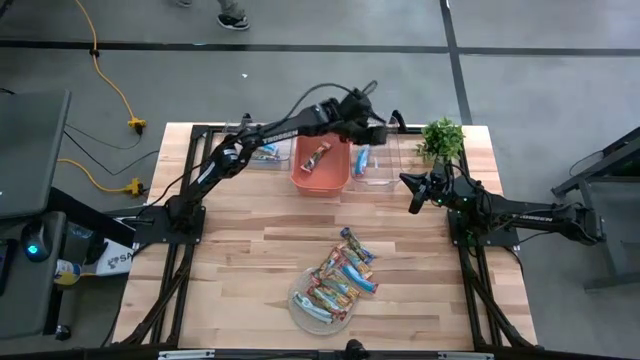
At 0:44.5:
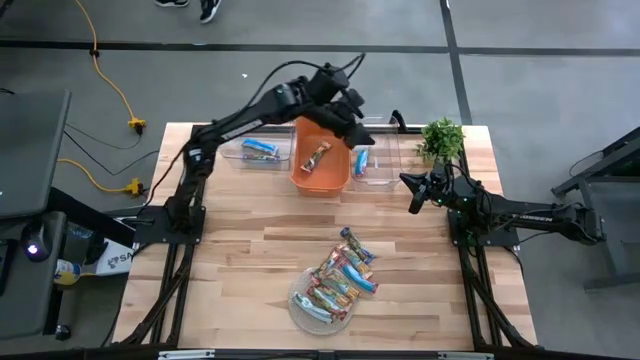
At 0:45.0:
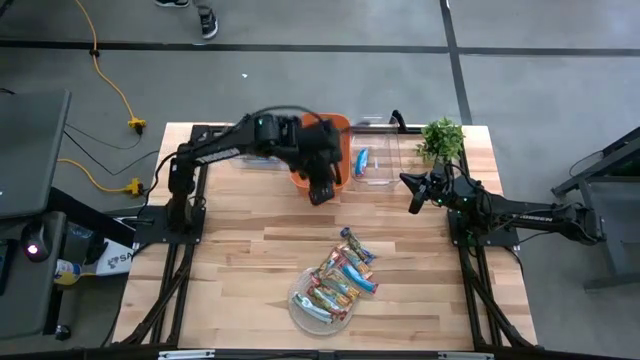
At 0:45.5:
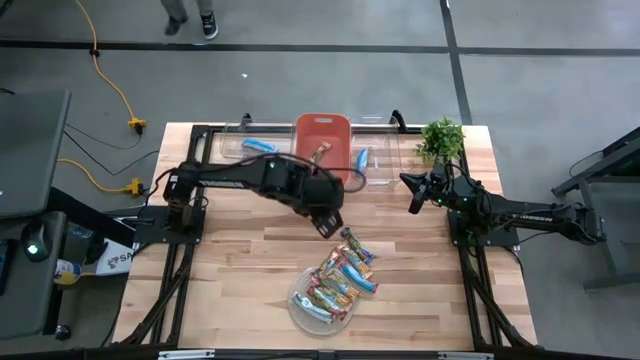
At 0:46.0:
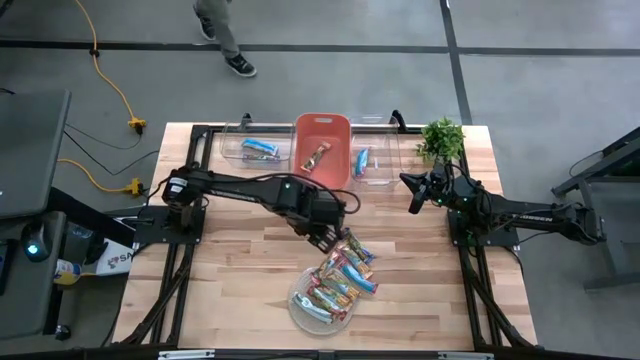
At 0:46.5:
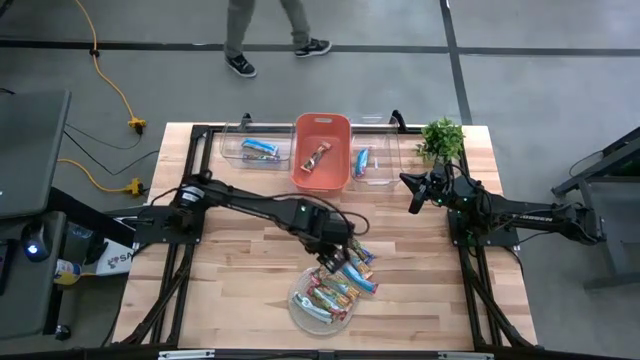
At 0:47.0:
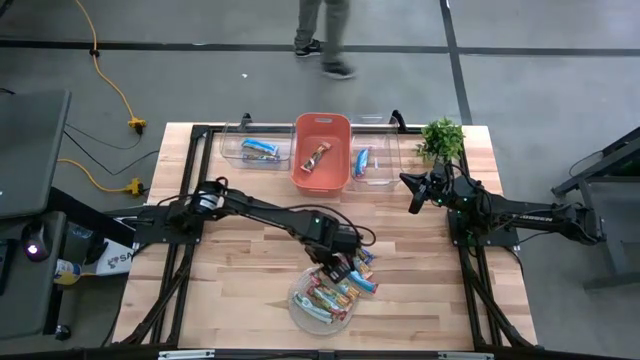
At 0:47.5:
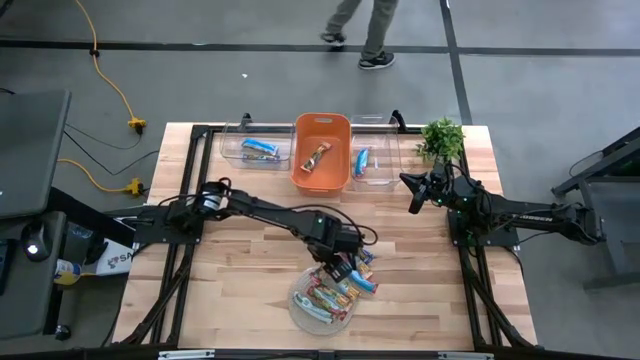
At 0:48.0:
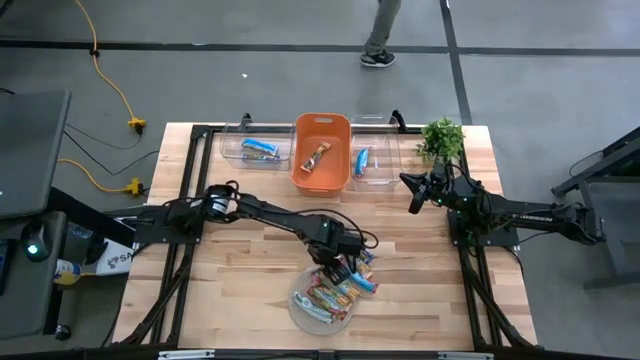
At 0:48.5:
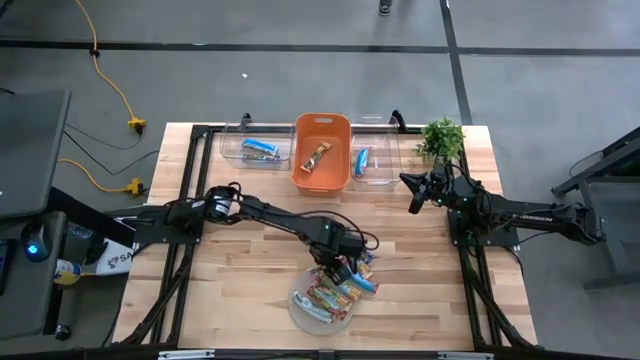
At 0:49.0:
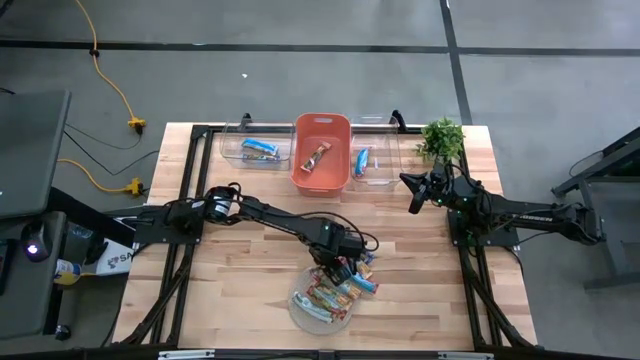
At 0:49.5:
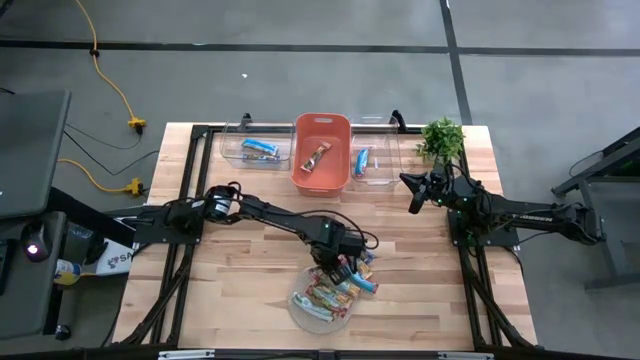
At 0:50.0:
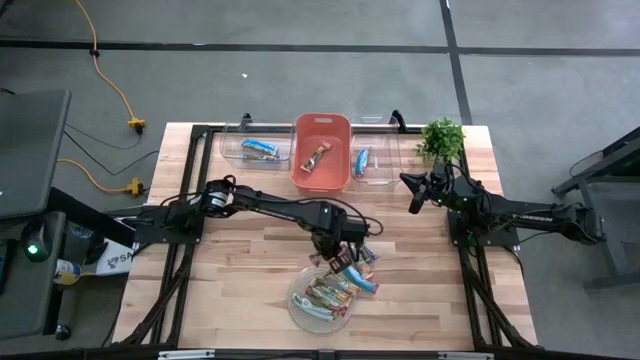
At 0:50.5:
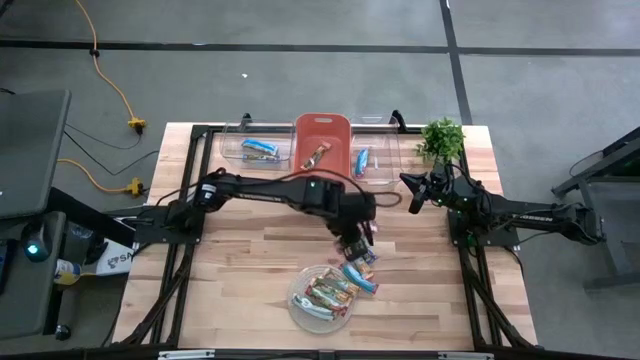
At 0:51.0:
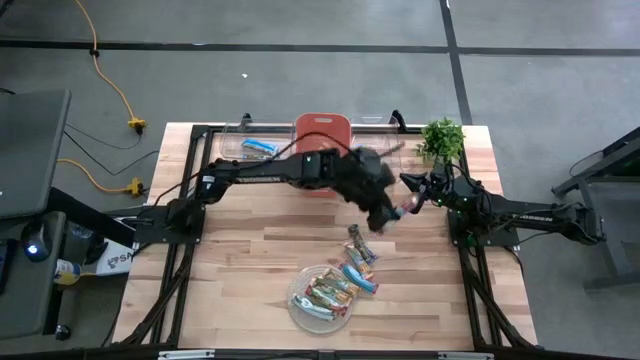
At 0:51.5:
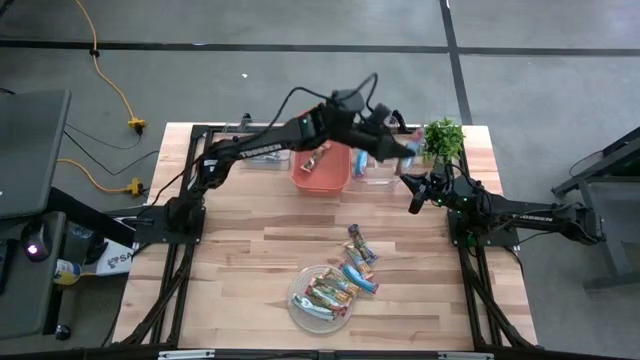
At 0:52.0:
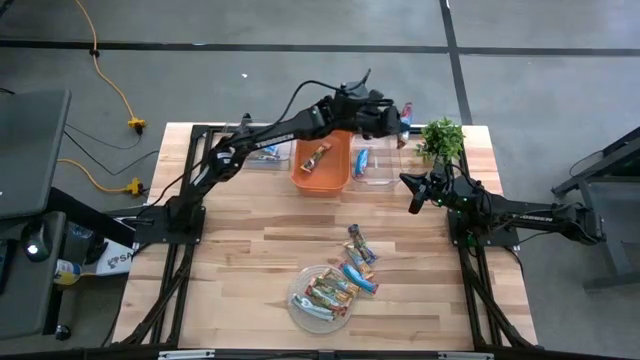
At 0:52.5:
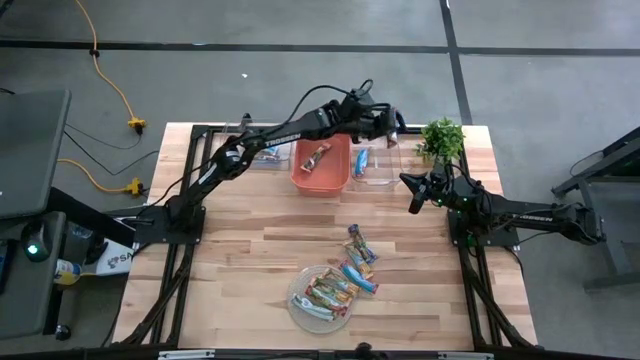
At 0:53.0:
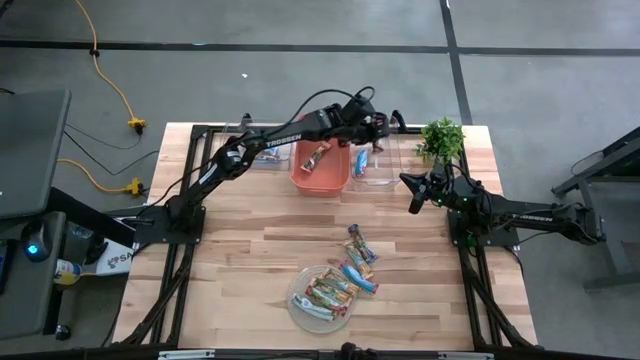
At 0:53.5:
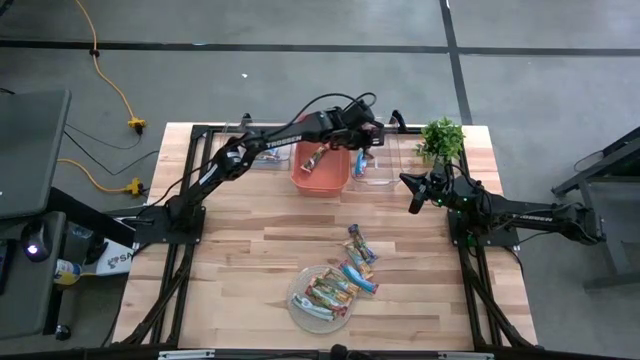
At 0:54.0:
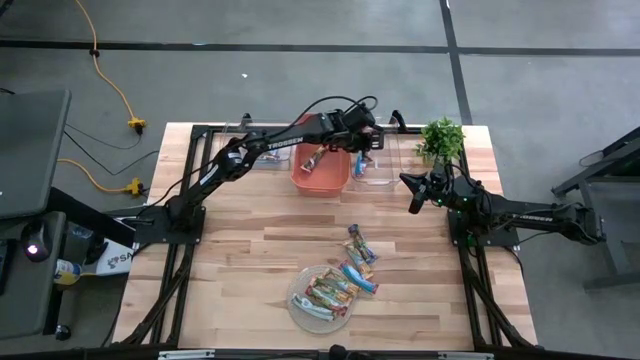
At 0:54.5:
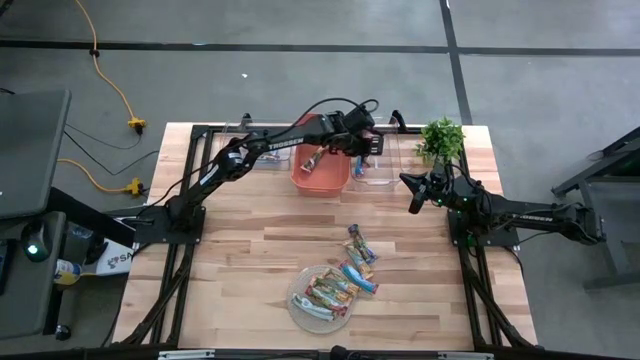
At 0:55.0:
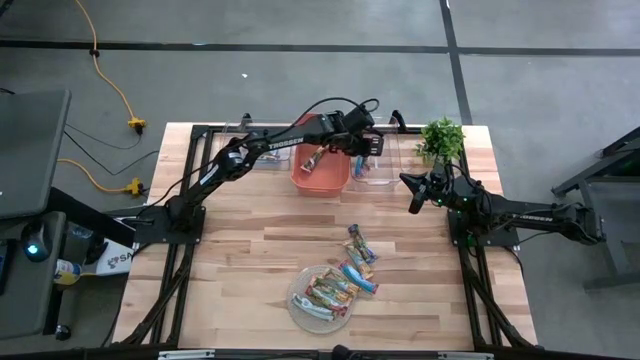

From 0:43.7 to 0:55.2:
Task: Pick and place Granola Bars by type
Put the red granola bar into the right transparent bin

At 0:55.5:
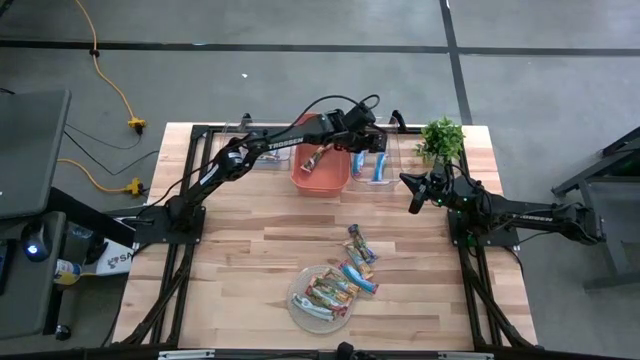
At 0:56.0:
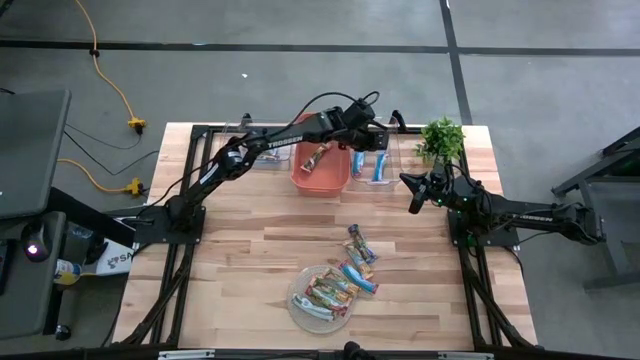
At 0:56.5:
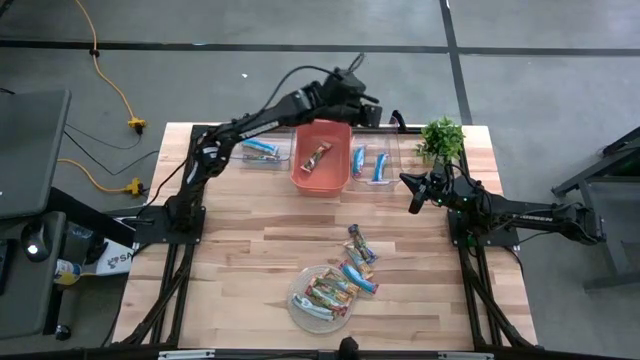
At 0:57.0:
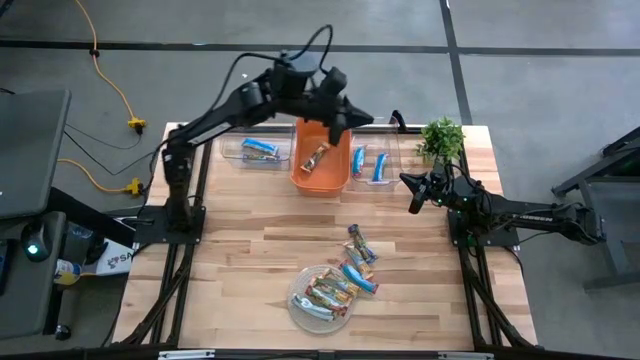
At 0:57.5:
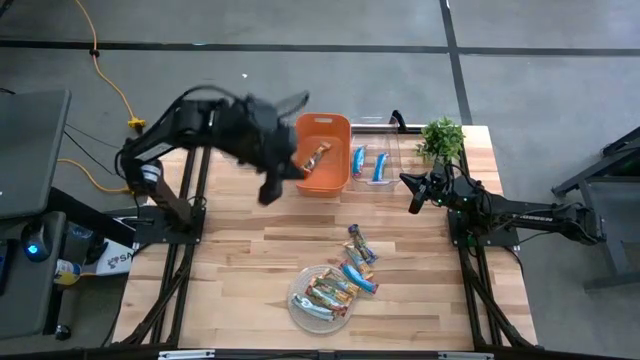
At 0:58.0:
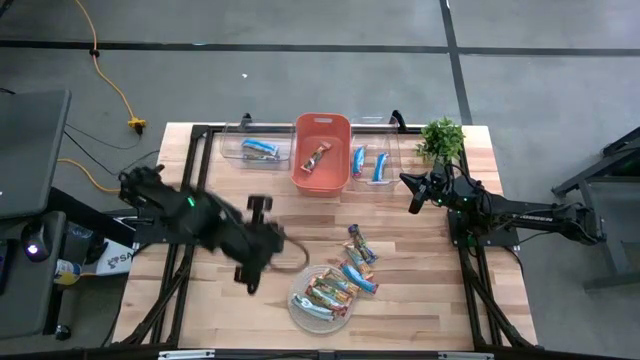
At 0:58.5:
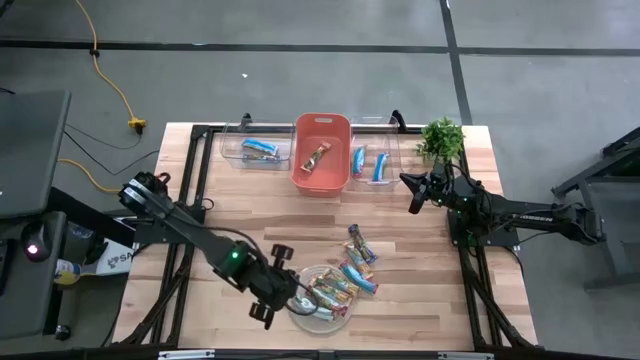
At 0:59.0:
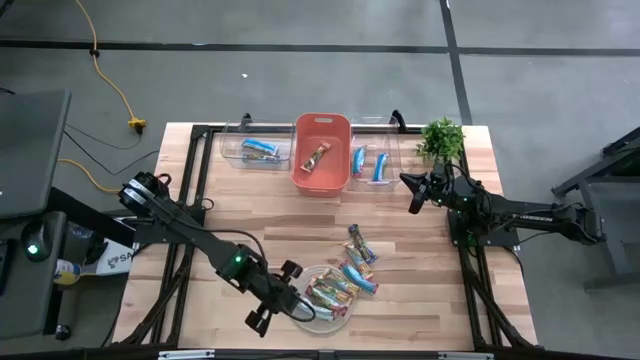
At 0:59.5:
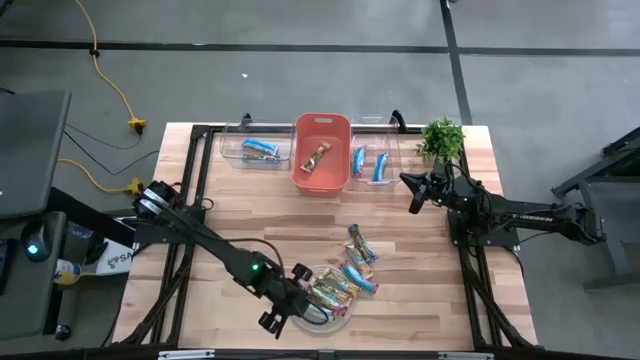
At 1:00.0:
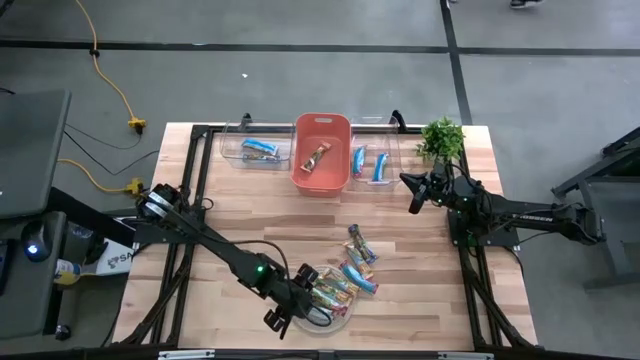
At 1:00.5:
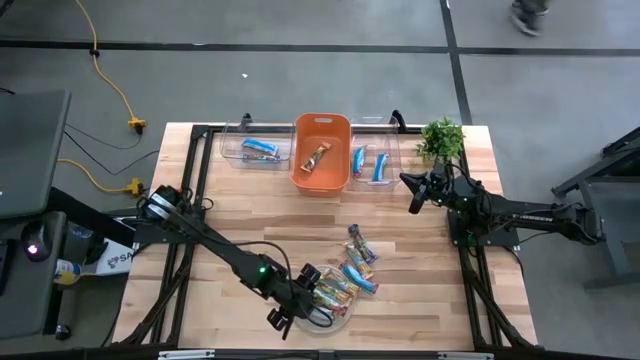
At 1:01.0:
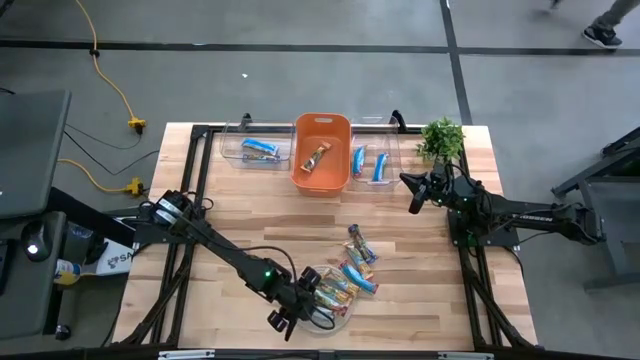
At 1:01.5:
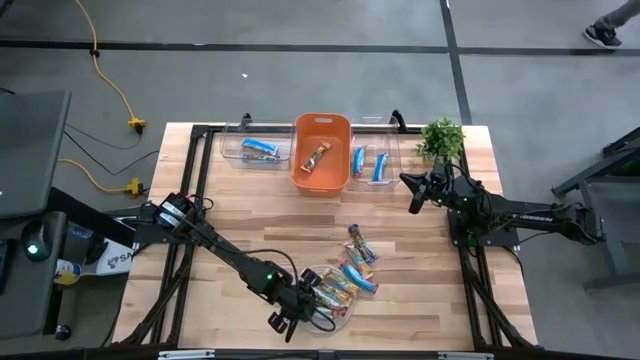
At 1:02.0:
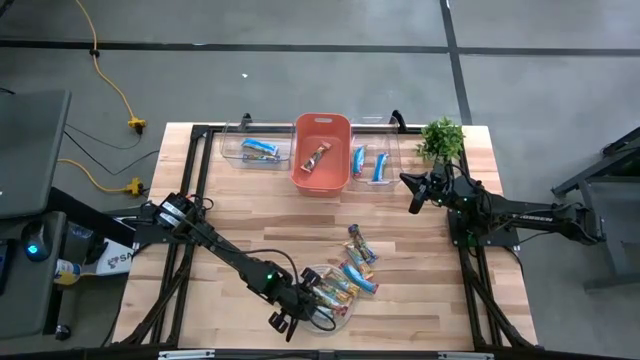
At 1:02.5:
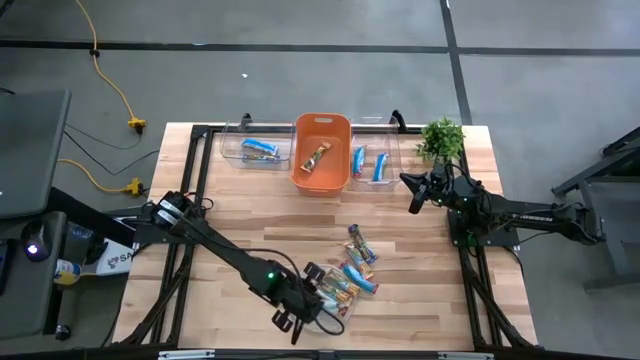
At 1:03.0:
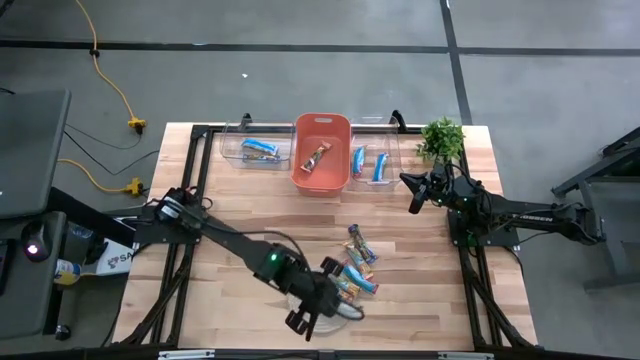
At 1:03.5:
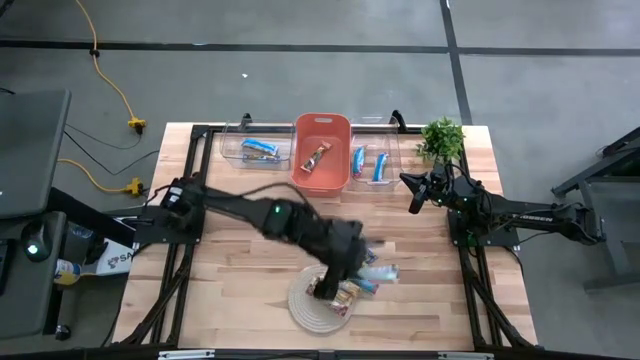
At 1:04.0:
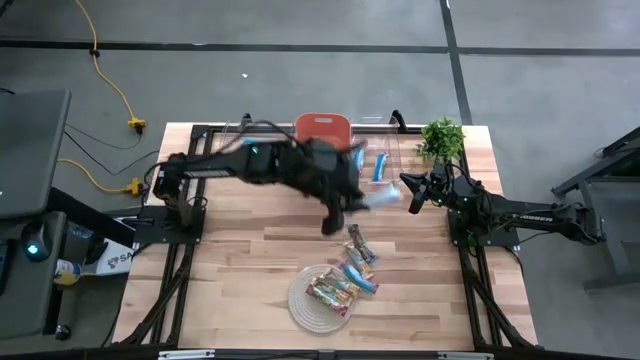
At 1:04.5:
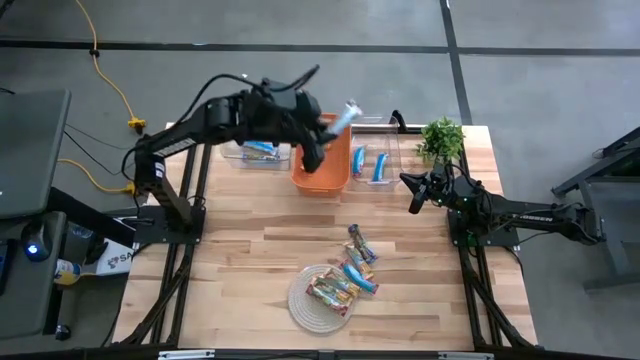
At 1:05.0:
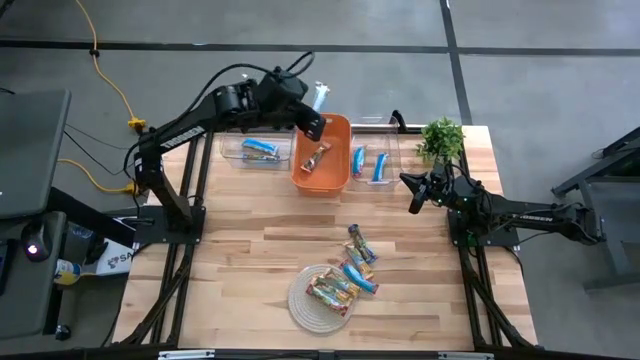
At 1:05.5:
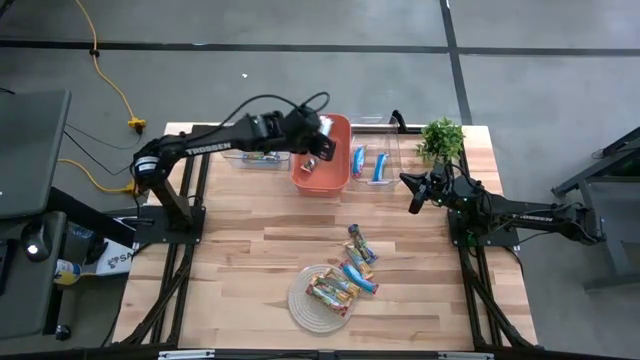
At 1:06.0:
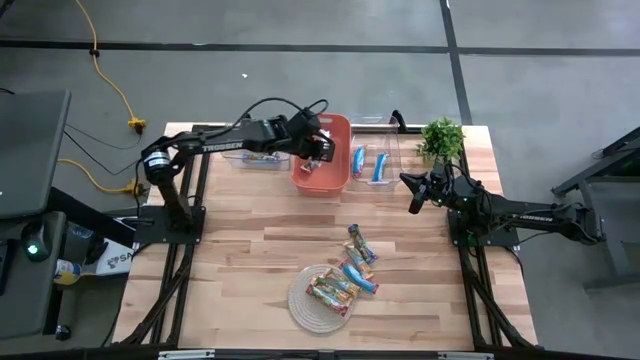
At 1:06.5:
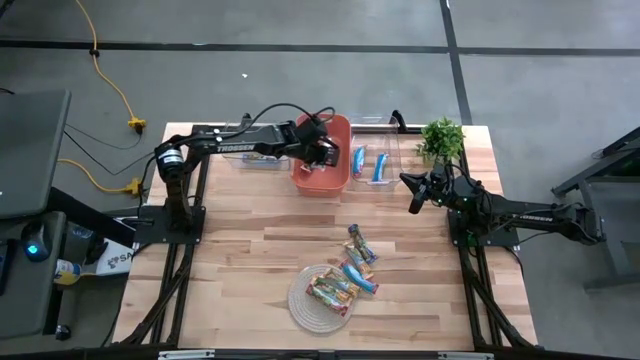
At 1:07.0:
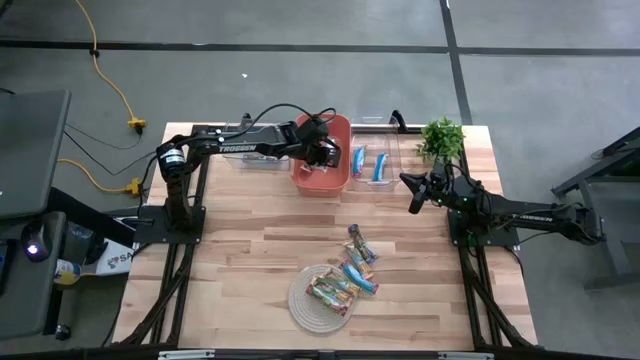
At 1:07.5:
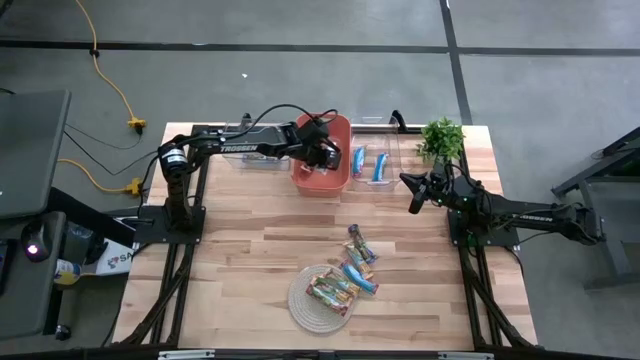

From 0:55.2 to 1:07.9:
Put the yellow granola bar into the orange bin
